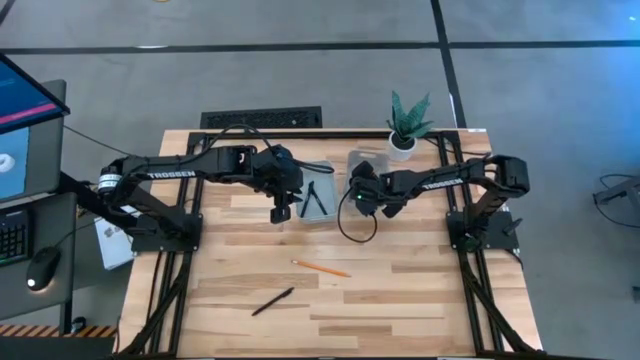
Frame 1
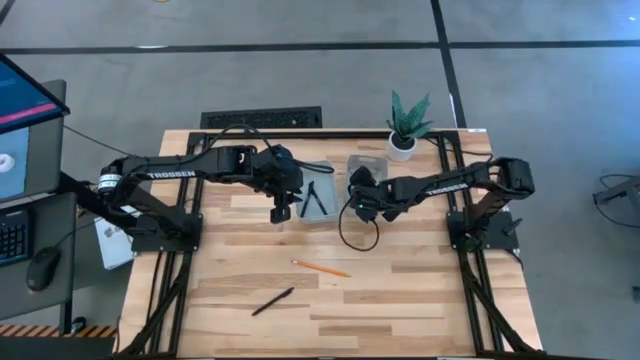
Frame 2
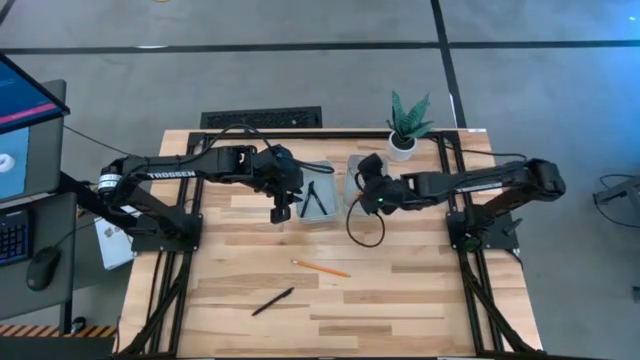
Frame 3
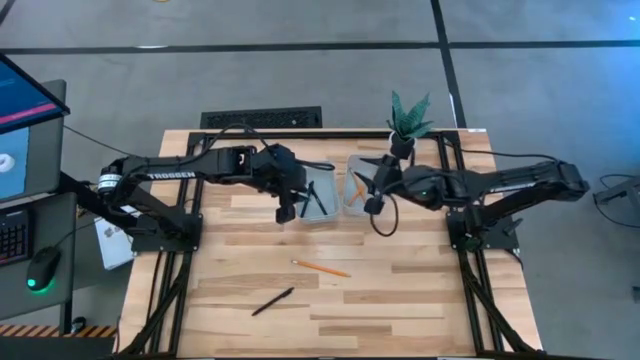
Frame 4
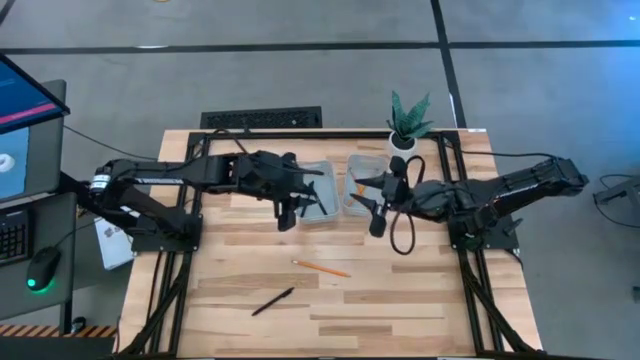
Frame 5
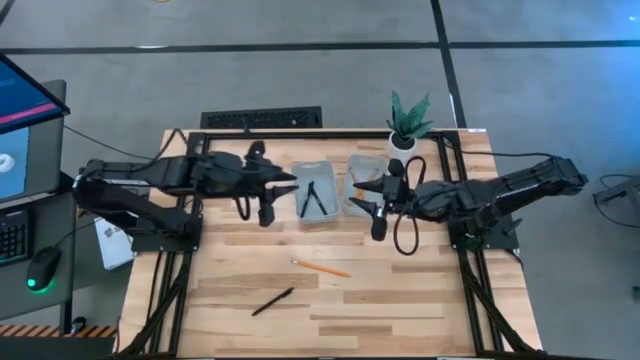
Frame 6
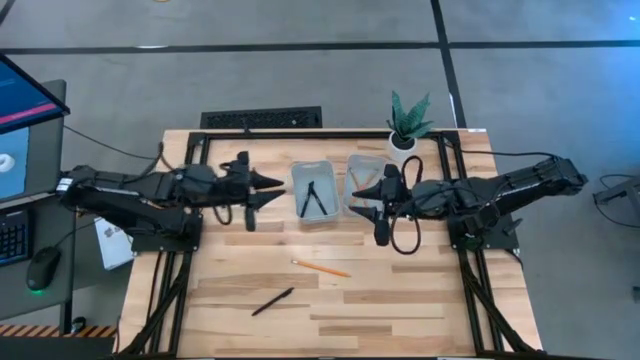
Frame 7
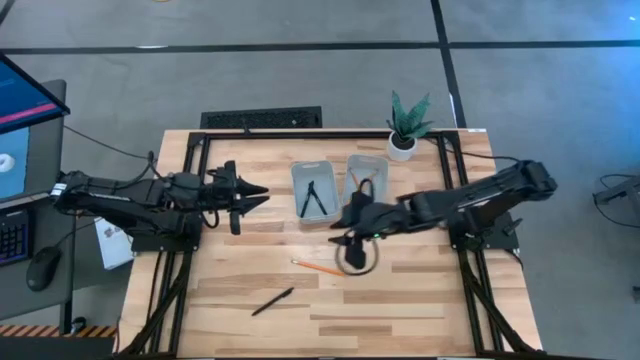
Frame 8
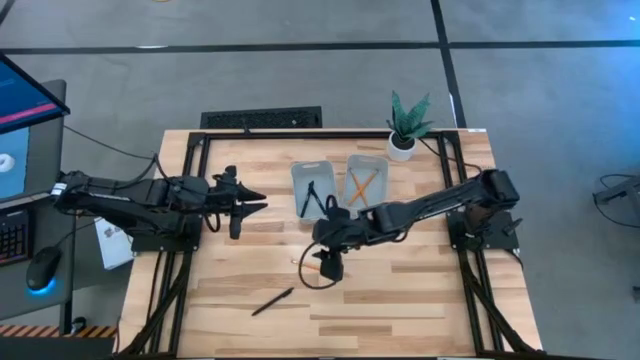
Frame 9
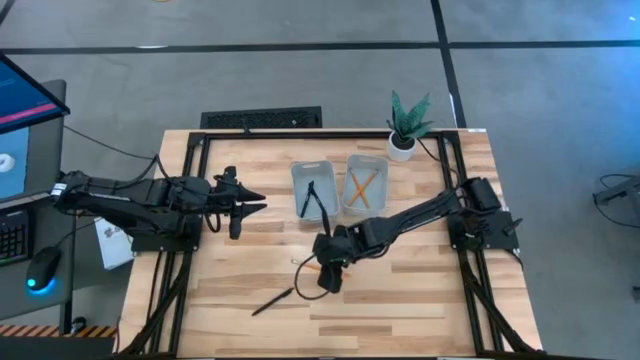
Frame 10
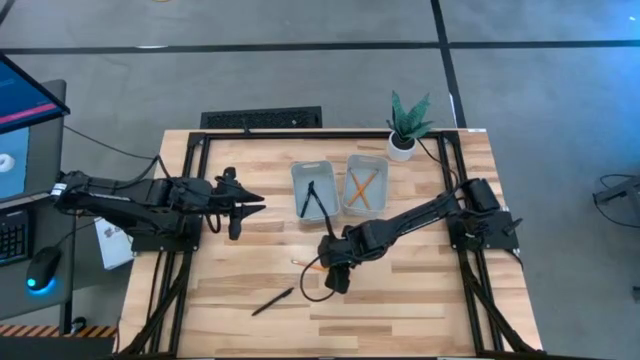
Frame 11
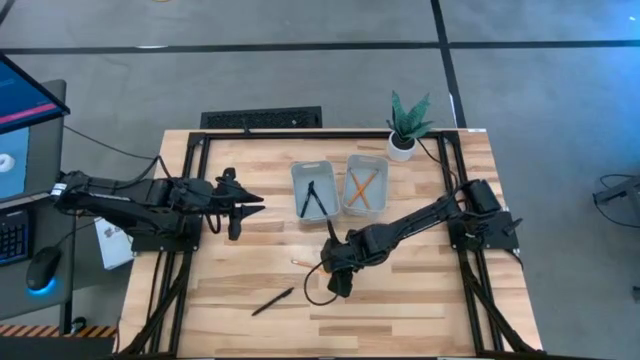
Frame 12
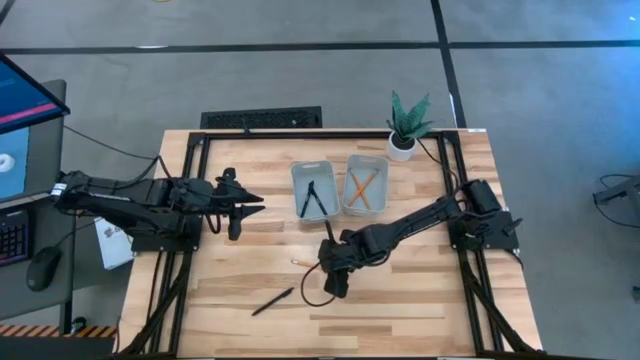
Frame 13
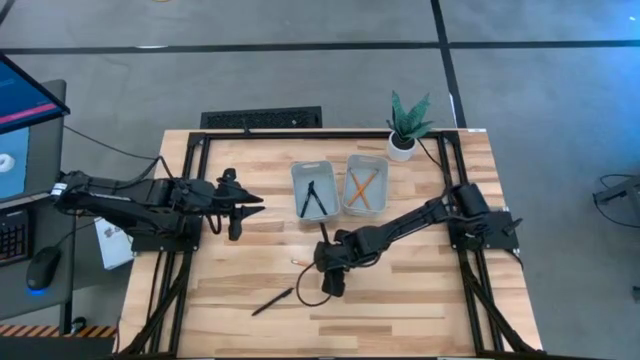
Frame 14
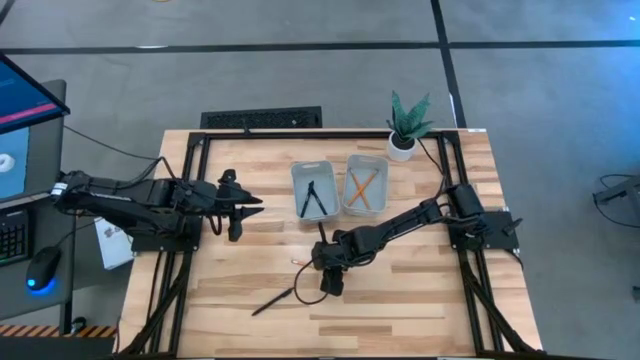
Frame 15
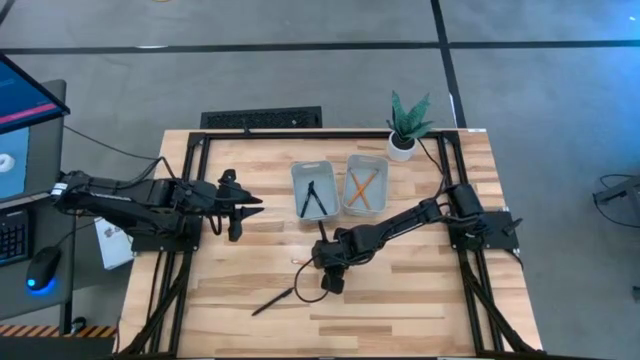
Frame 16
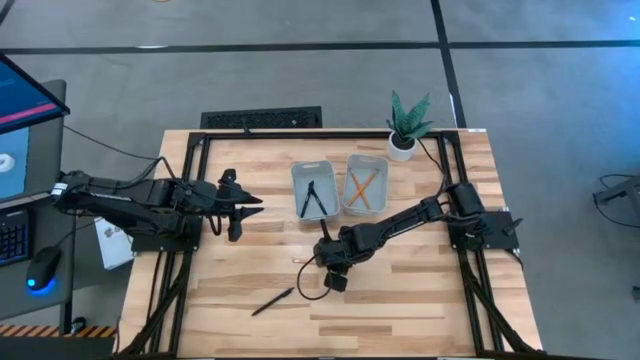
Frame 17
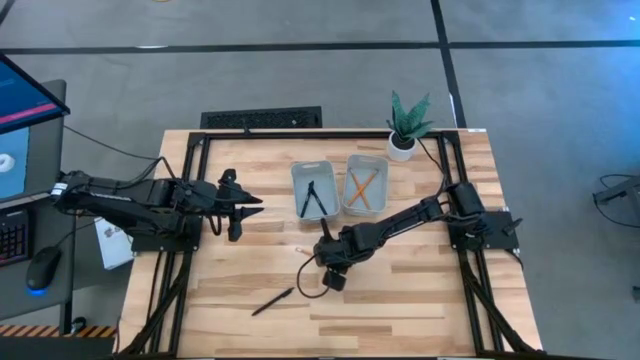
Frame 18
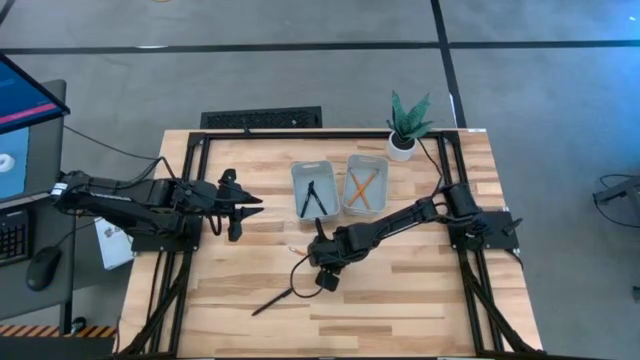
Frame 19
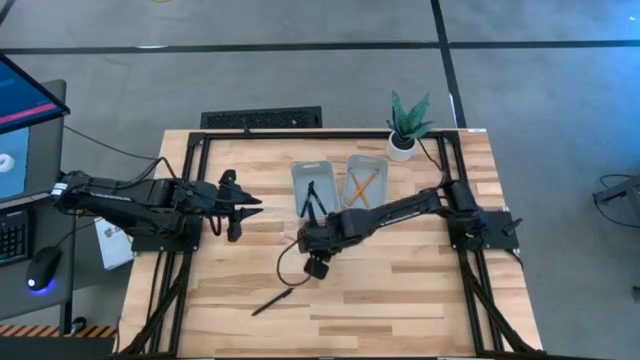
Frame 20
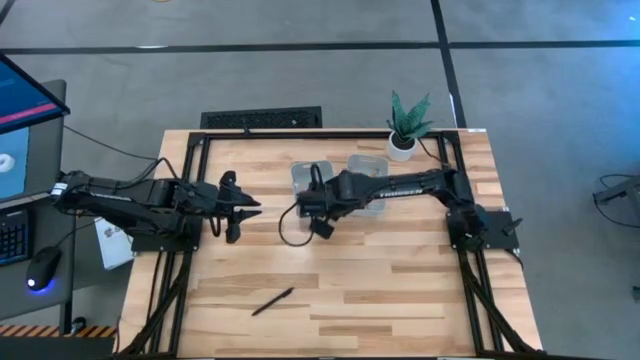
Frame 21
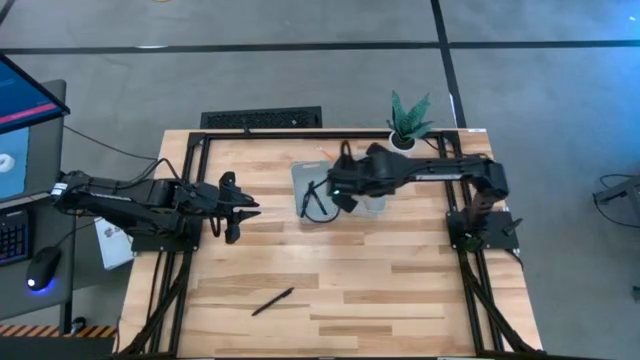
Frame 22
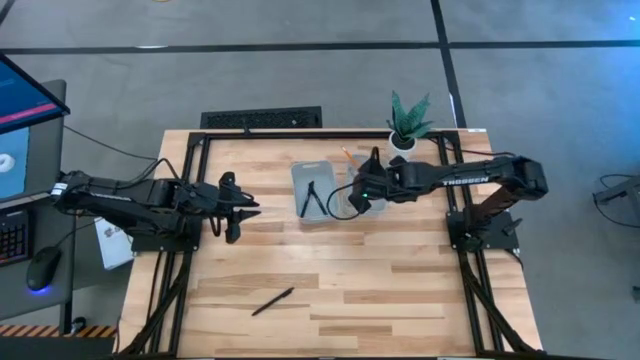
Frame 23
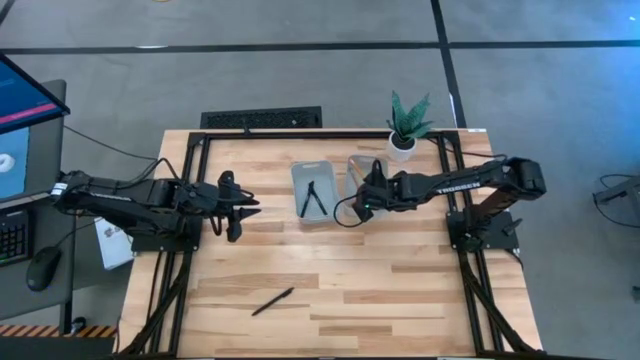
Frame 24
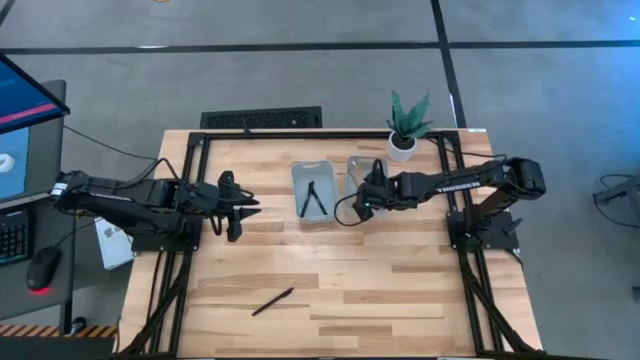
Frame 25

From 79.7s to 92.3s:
Task: Sort pens & pencils
Put the yellow pencil into the right gray bin

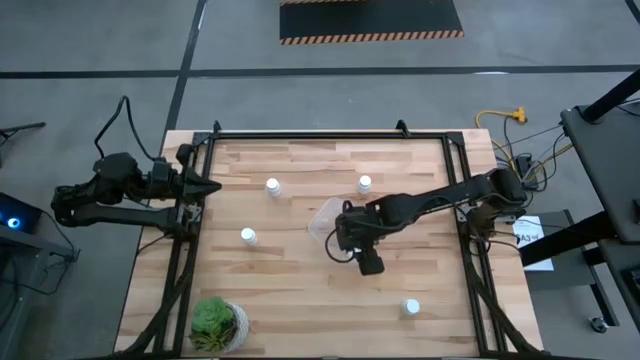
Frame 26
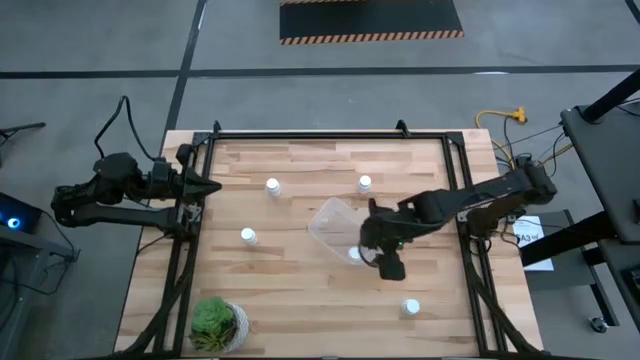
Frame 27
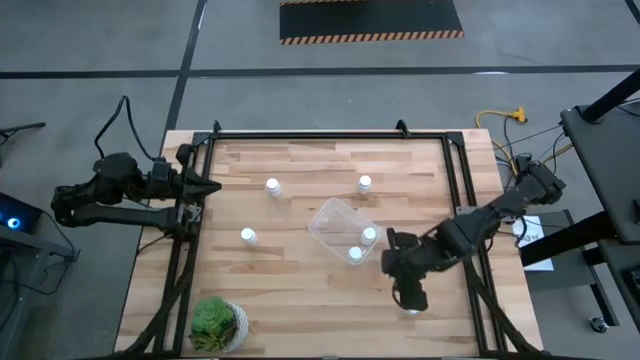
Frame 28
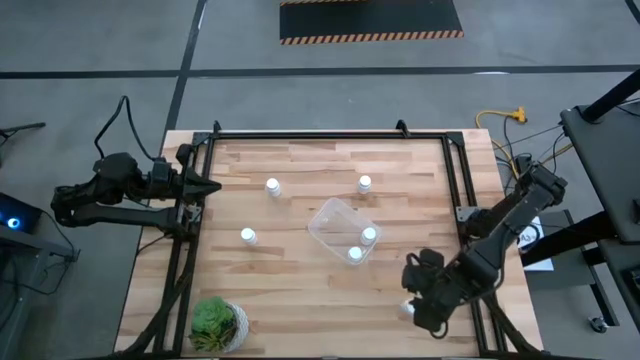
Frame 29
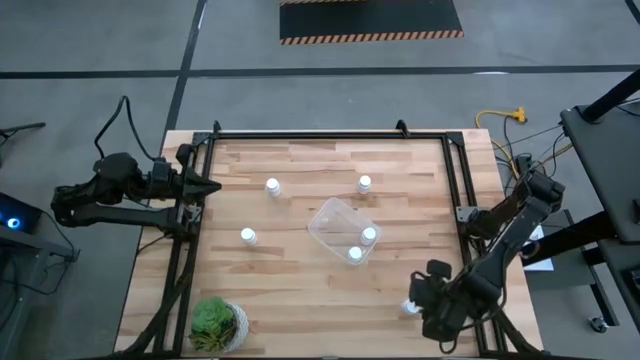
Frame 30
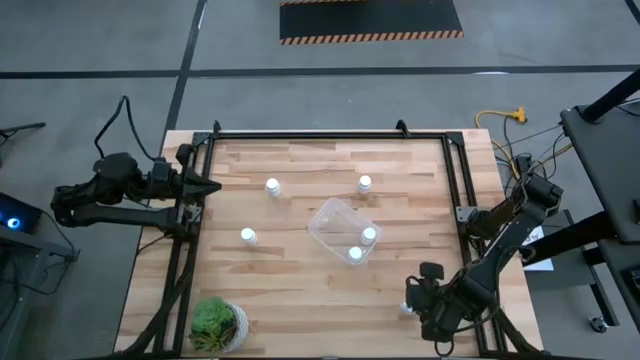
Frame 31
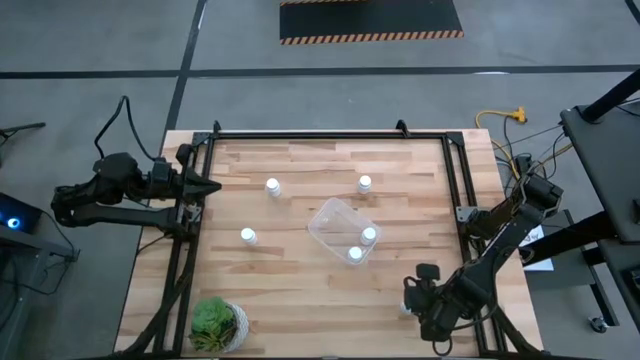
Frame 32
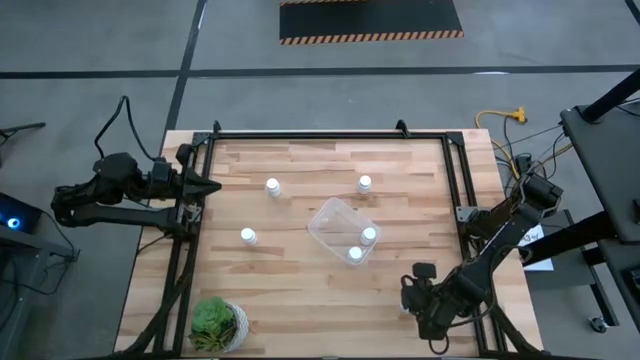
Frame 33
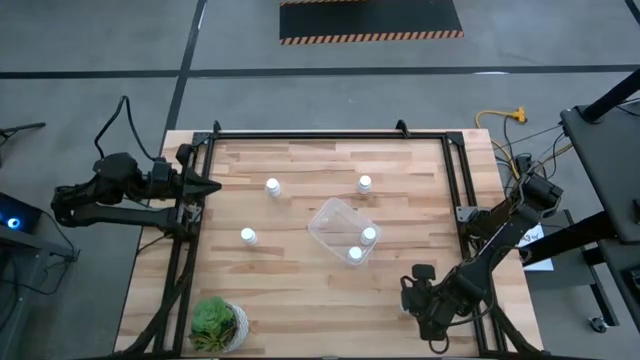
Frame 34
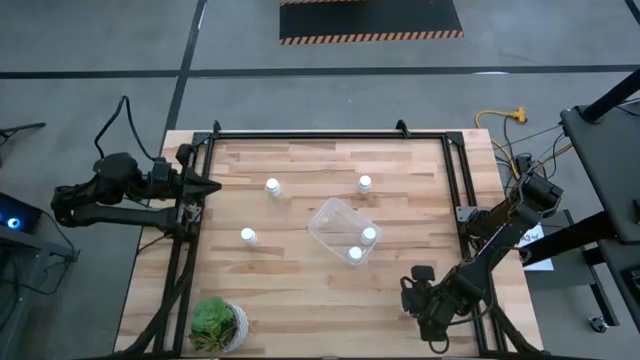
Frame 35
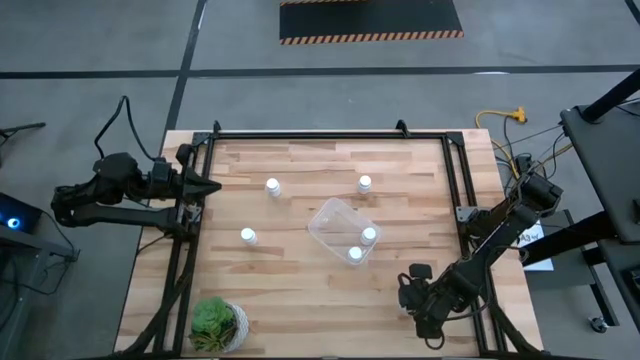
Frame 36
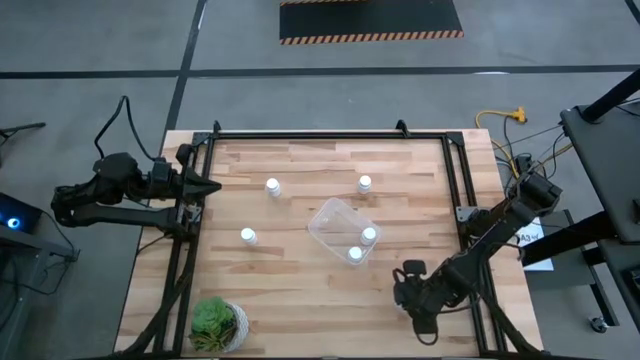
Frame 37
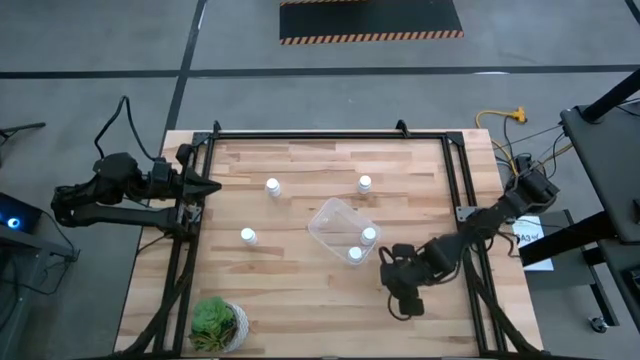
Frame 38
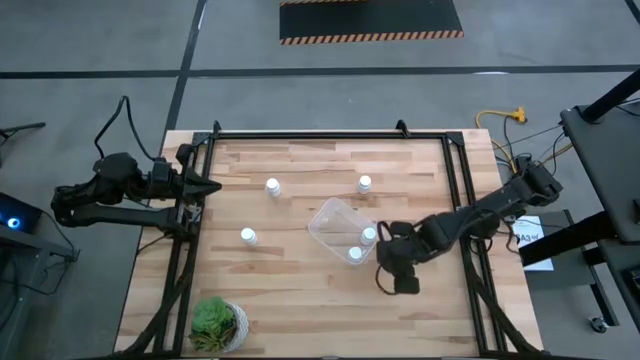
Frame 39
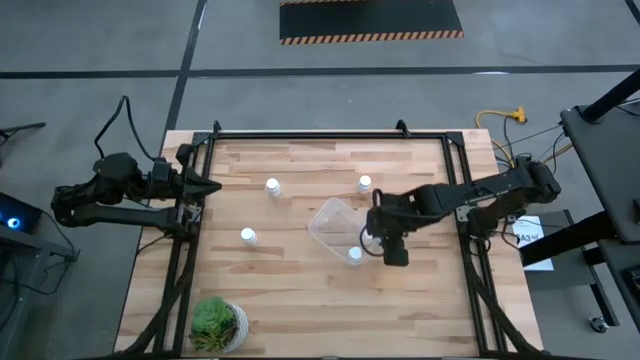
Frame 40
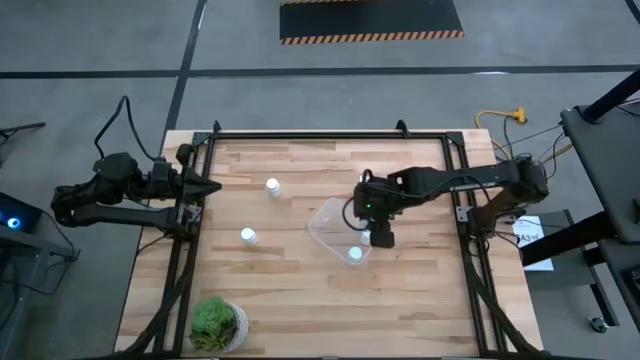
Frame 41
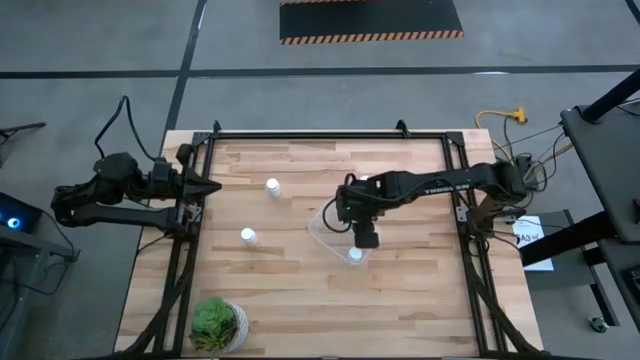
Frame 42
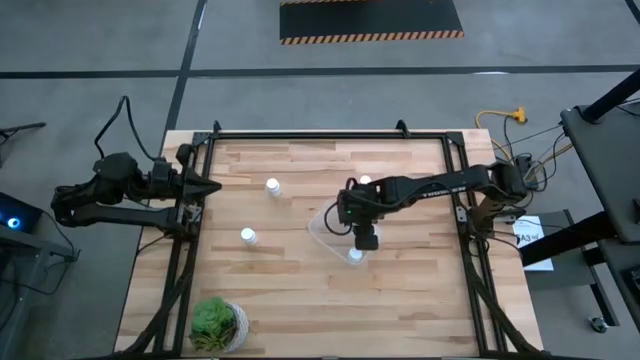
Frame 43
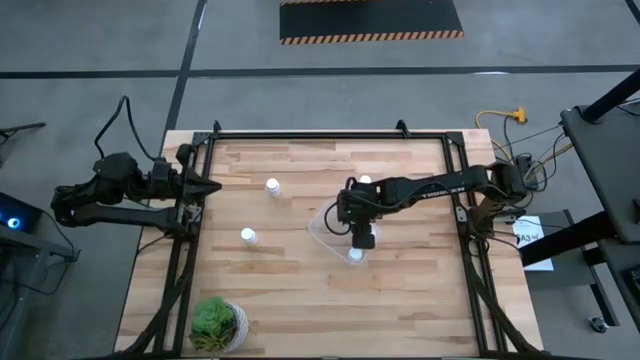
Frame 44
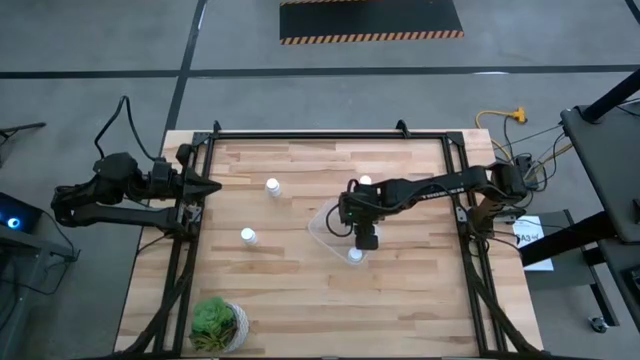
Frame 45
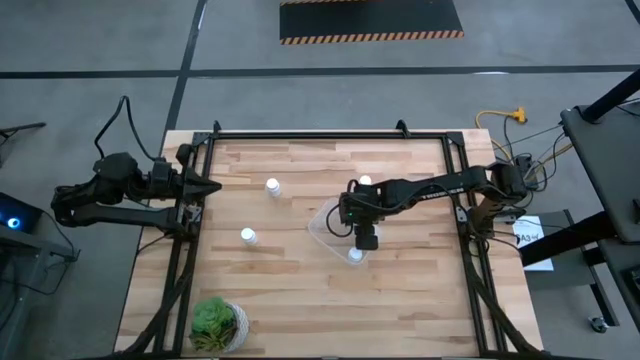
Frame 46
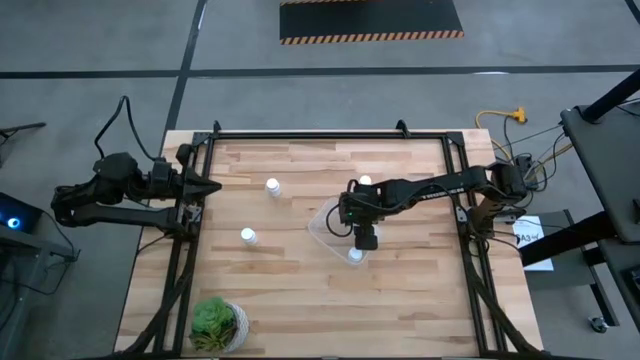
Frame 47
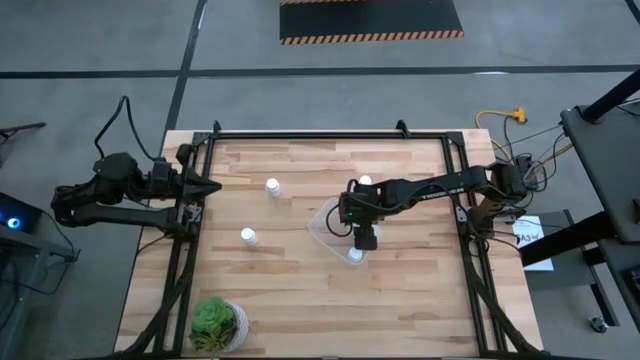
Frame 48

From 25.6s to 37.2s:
Task: Pick and place pill bottles into a basket
Put the white pill bottle into the transparent bin
